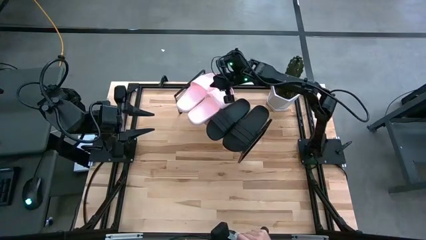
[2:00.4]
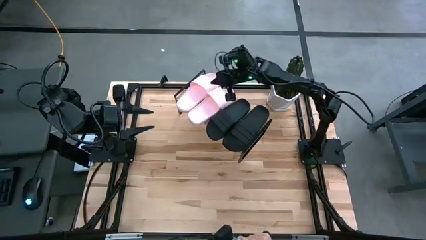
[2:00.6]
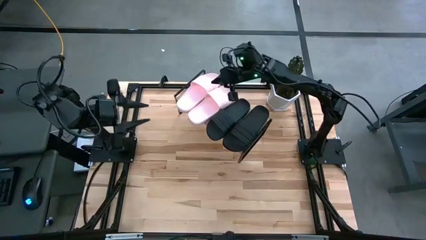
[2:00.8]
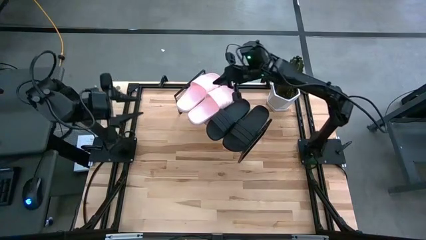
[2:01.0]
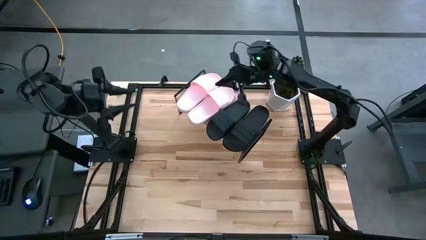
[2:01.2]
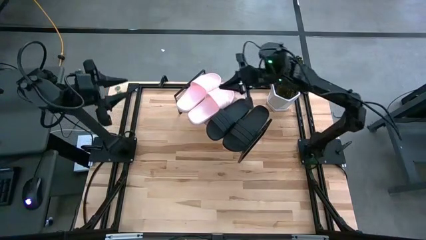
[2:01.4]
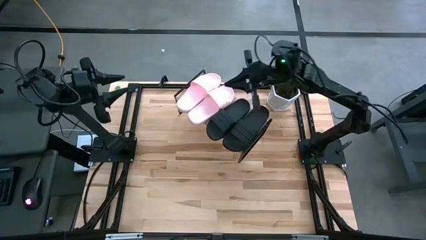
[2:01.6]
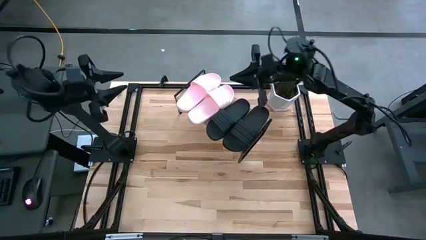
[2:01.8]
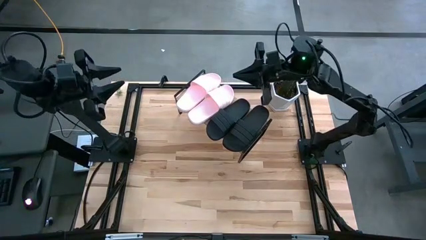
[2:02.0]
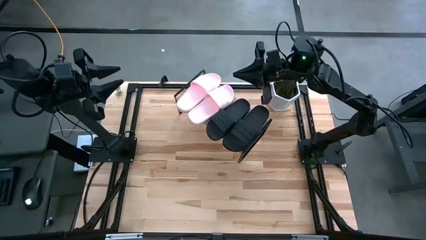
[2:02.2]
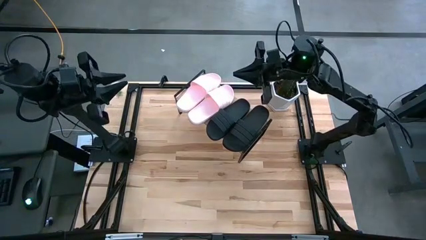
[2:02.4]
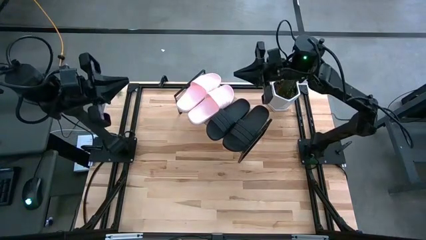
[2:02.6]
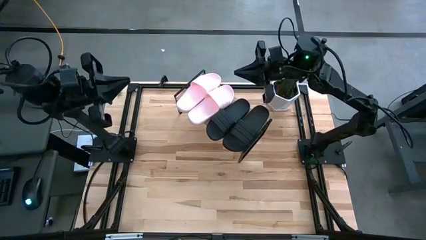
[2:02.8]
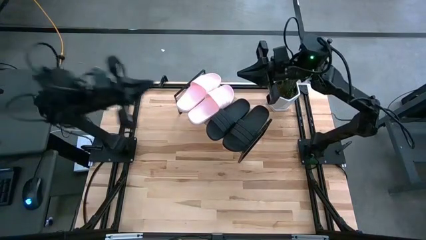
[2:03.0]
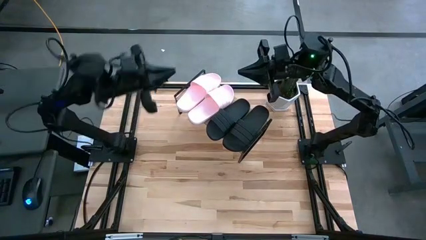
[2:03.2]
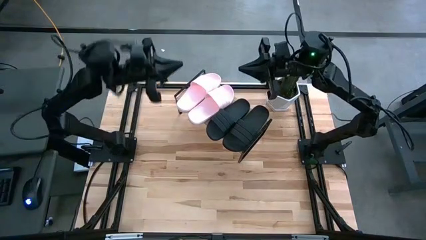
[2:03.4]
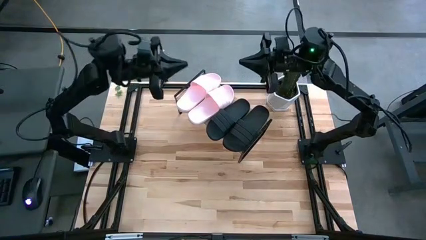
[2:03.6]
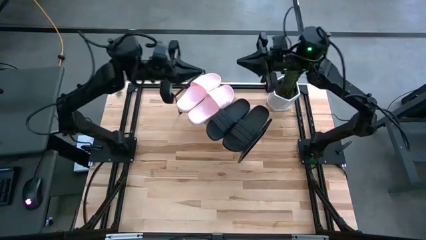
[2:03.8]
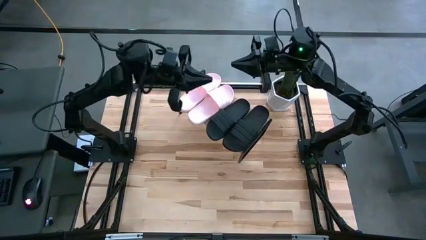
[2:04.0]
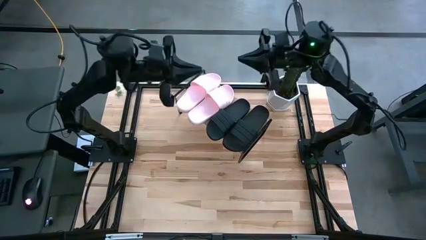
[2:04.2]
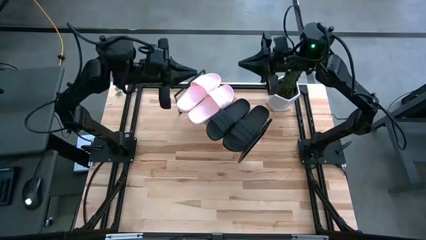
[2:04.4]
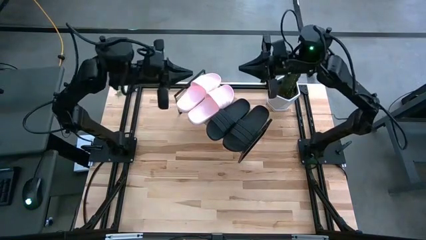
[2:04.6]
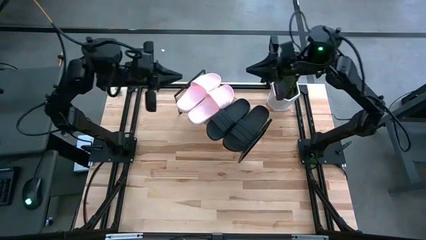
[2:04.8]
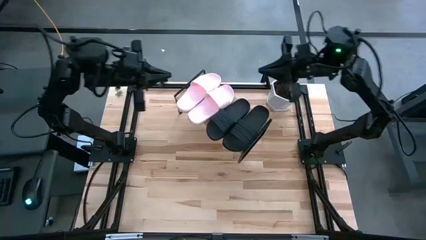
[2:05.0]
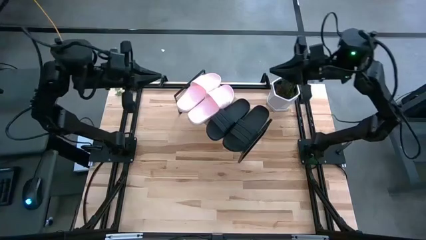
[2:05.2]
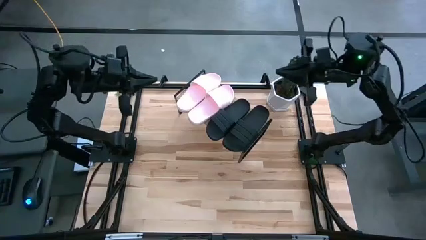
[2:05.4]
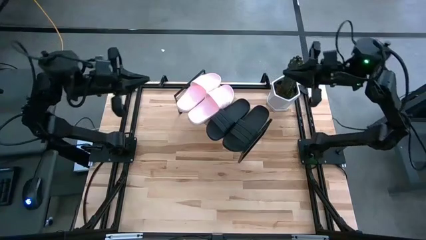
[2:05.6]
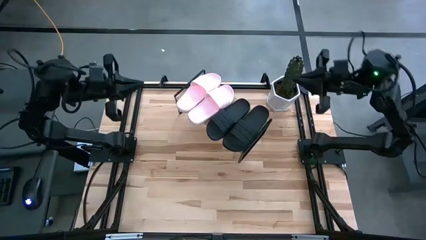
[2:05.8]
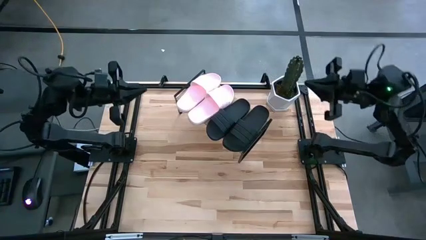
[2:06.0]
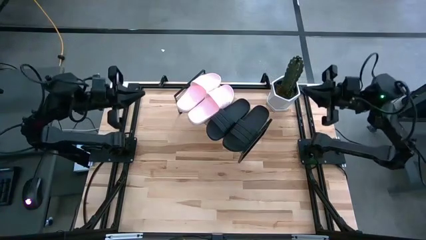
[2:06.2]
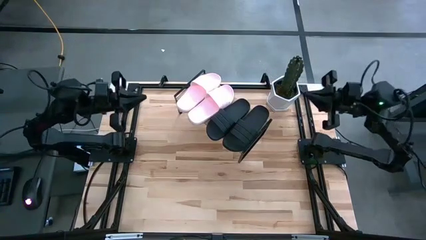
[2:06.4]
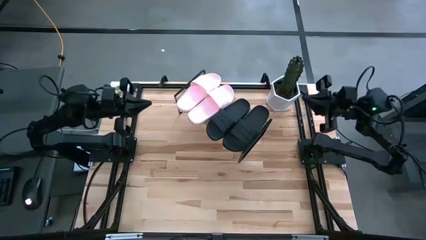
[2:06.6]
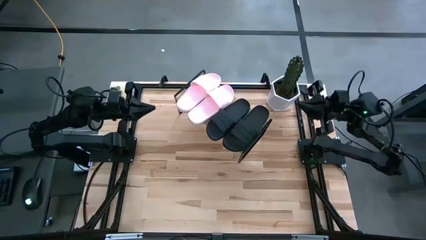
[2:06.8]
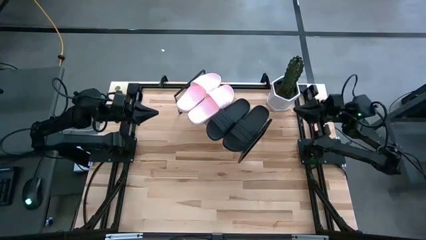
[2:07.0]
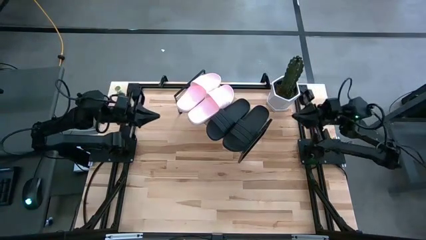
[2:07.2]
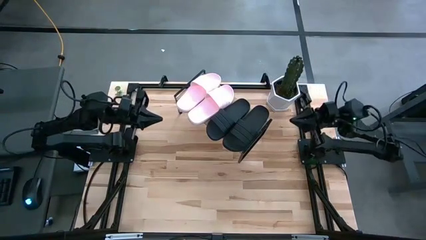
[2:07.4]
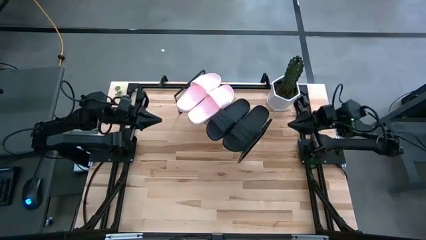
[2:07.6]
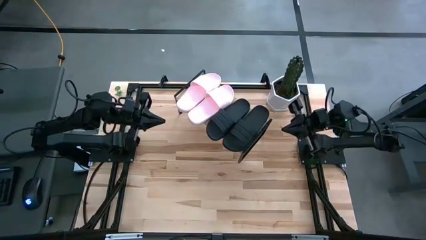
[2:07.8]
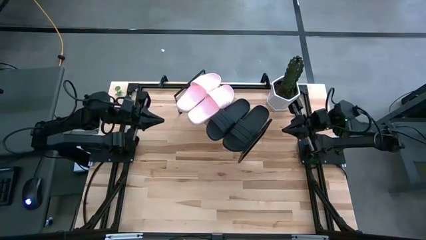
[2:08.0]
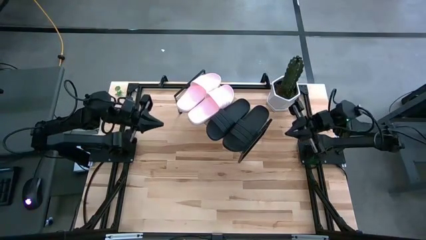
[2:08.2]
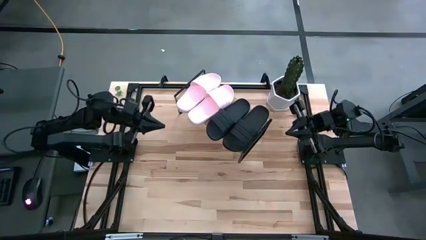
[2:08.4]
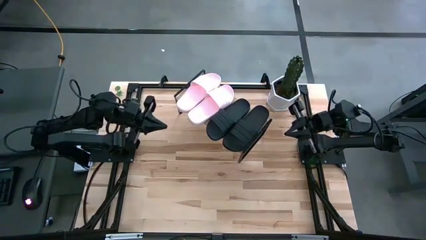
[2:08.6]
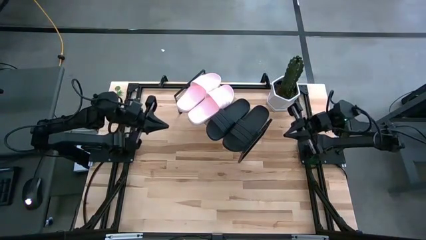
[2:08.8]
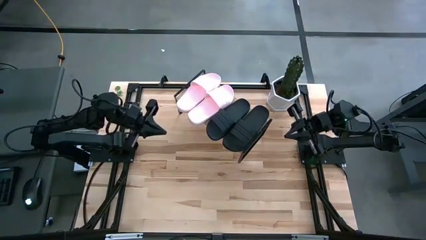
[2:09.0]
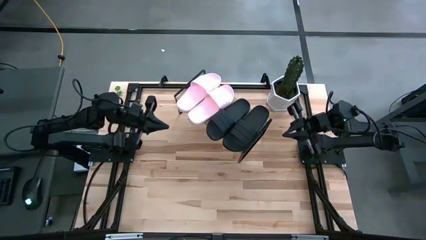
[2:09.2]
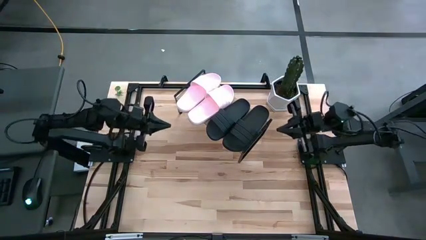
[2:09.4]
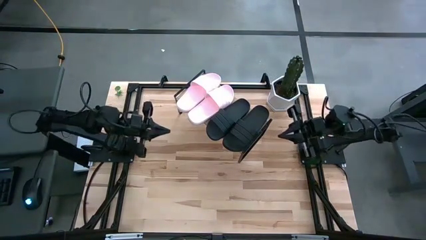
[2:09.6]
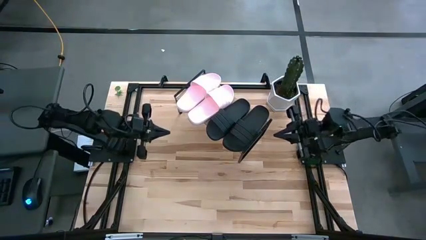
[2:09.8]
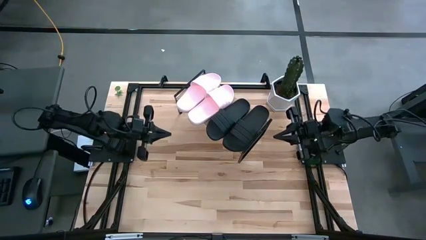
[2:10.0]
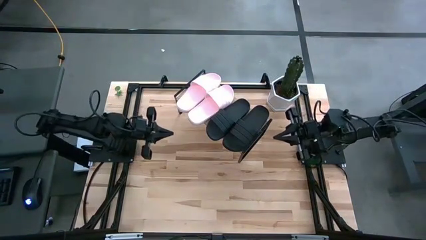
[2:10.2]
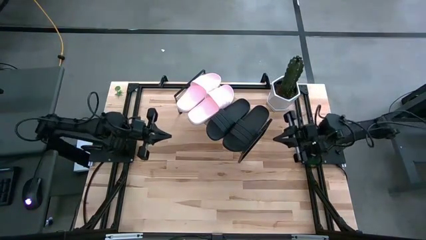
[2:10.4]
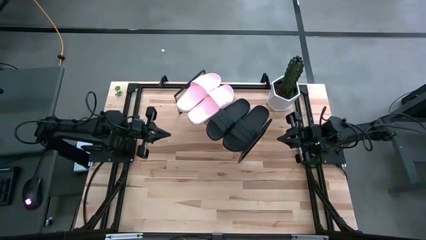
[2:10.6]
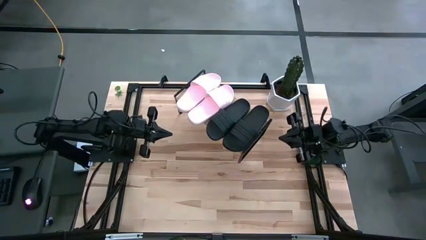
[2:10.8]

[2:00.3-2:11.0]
Task: Pick and place slides into the shelf
Return to Home Position

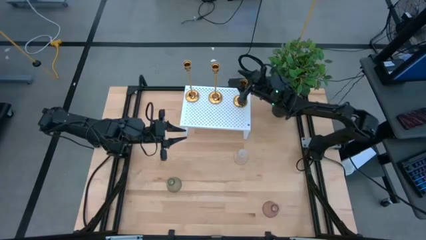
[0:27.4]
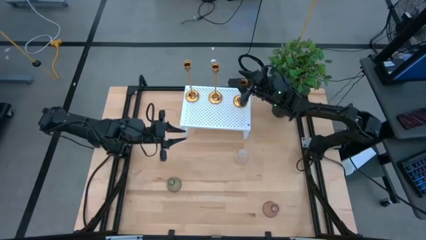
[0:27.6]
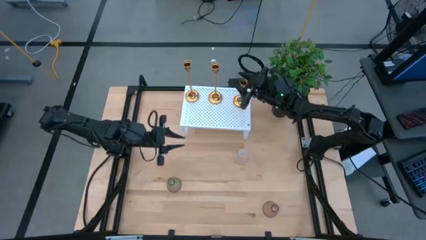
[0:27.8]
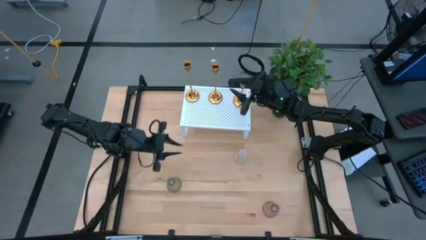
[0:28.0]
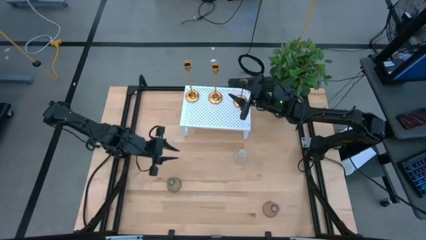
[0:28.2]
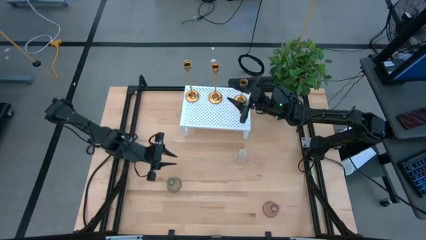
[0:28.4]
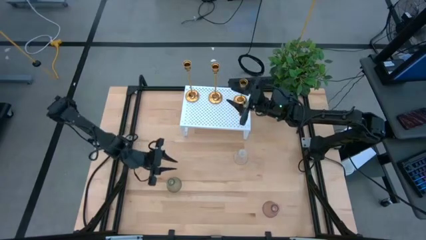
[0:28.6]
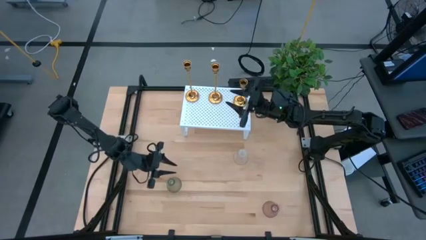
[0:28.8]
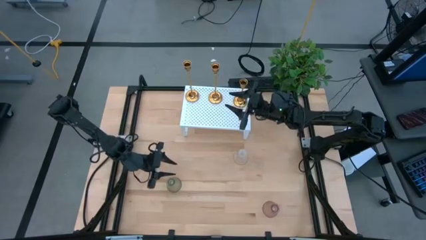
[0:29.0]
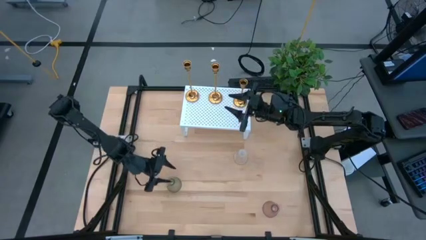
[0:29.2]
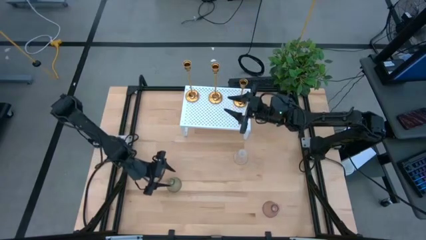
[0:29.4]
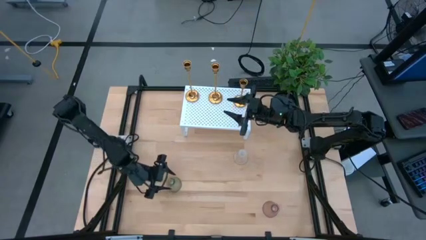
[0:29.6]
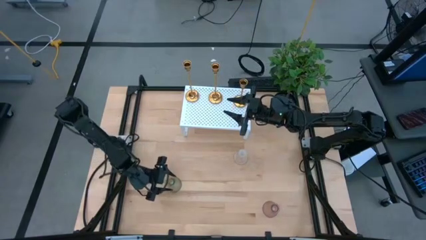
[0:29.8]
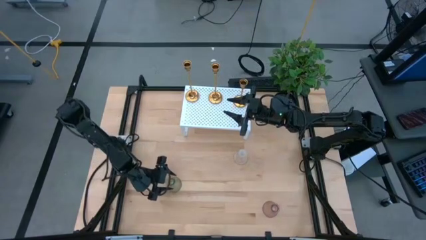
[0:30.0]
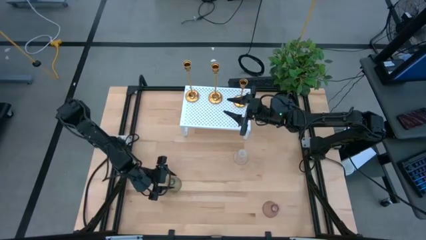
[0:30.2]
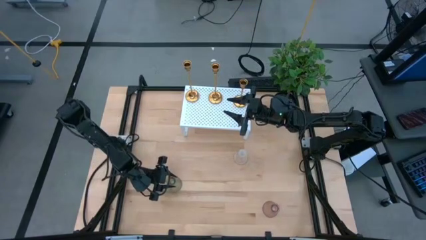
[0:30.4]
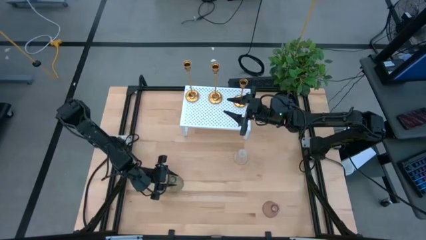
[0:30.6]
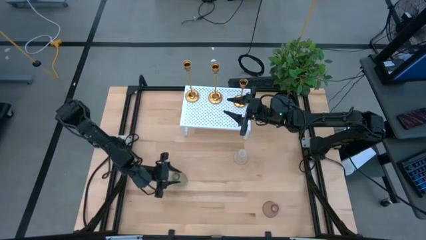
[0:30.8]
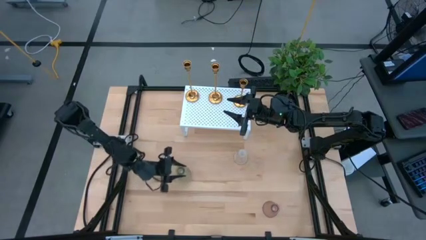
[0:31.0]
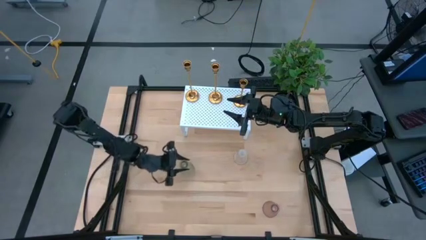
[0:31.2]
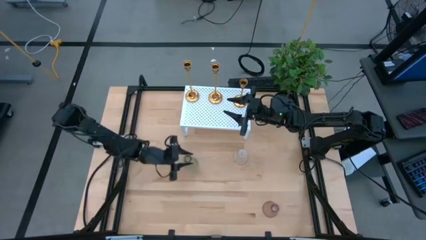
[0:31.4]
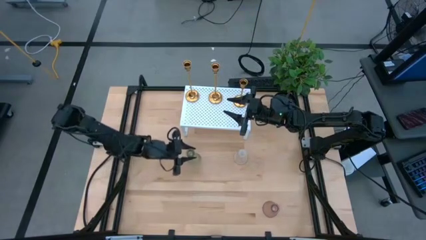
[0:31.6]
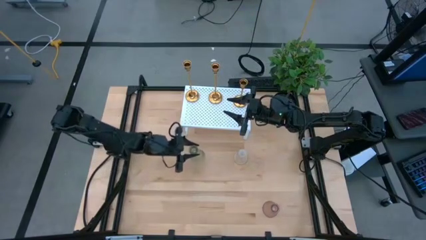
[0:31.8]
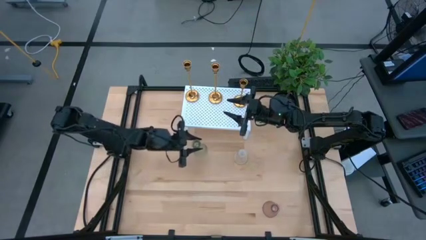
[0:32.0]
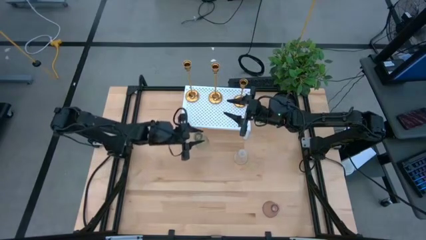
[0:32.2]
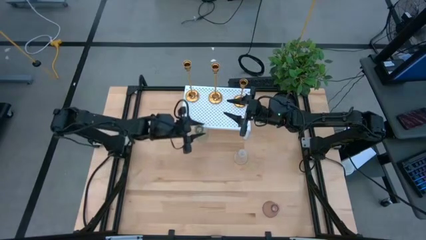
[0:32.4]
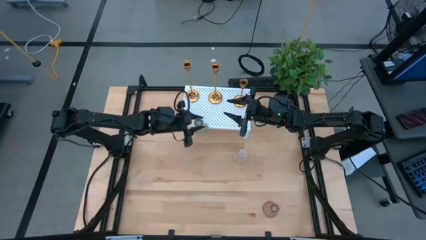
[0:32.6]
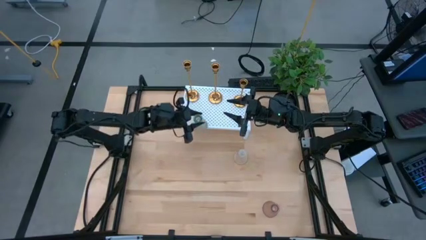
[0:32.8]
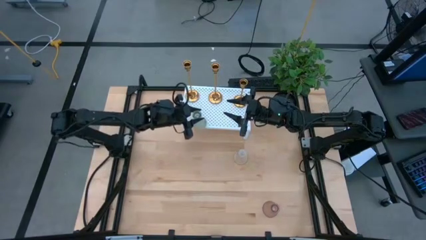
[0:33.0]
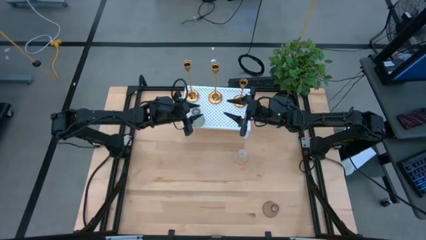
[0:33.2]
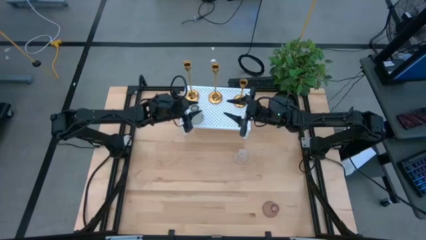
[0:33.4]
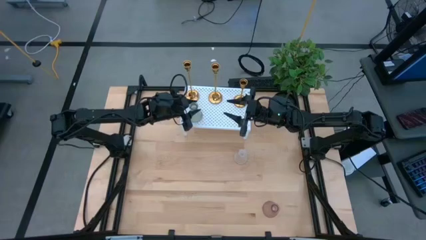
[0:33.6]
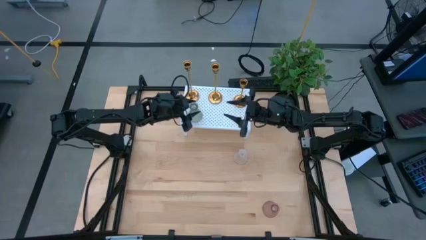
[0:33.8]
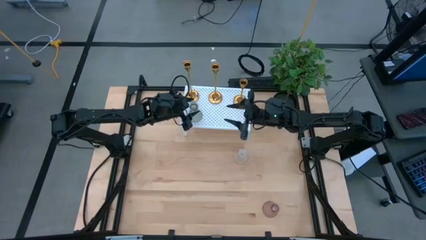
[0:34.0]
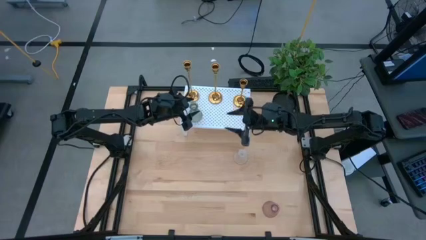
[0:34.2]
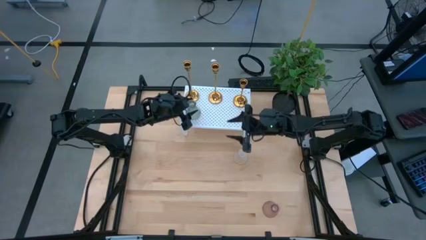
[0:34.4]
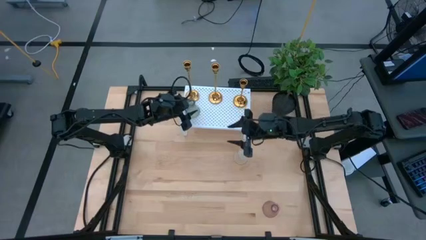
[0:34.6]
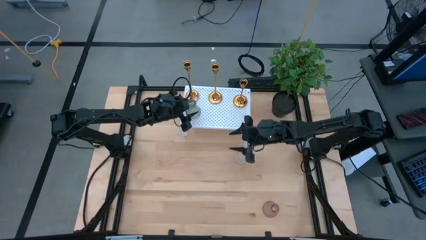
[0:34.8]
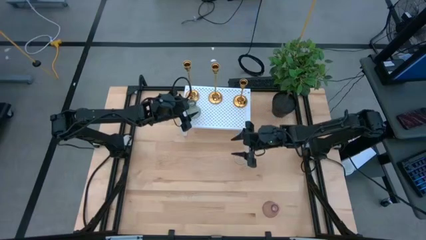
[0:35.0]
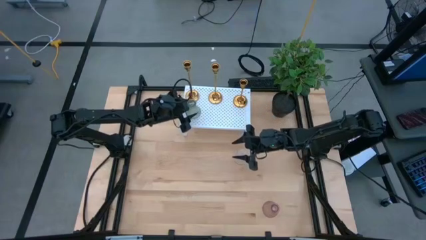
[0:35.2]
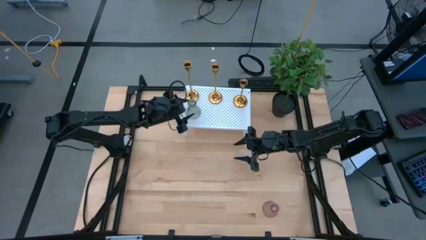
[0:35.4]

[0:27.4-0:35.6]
Task: Pick & Place candle stick holders
Put the green glass candle holder on the shelf
